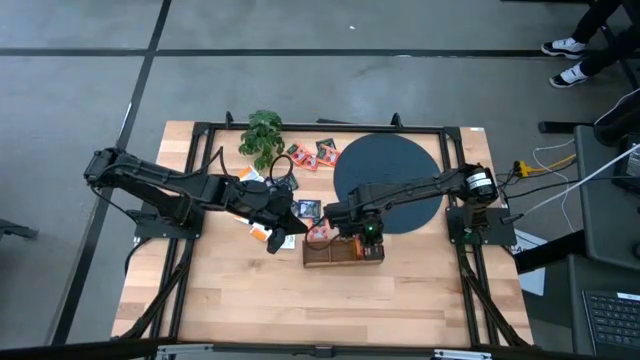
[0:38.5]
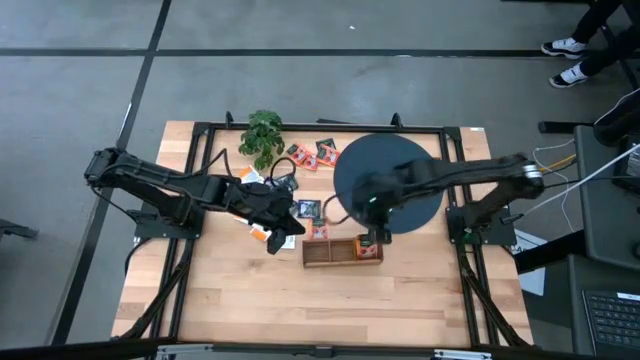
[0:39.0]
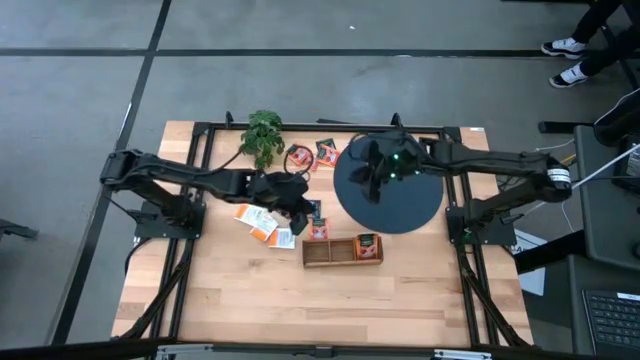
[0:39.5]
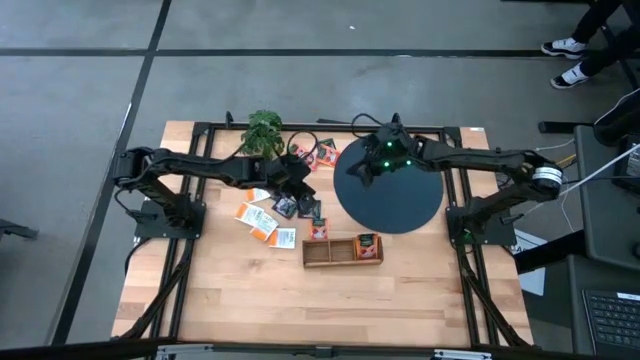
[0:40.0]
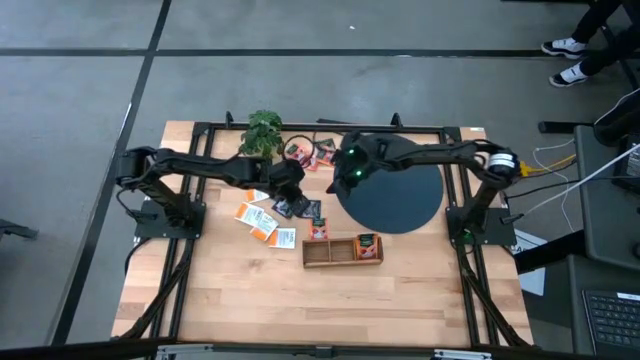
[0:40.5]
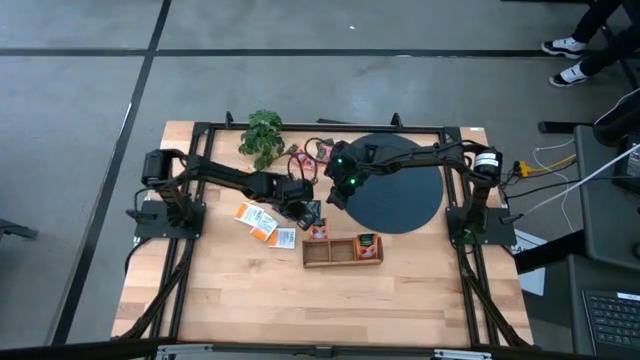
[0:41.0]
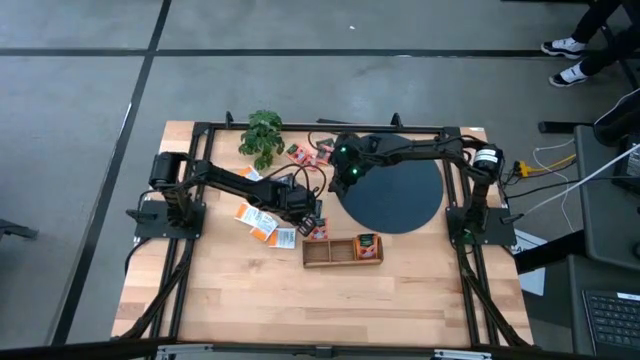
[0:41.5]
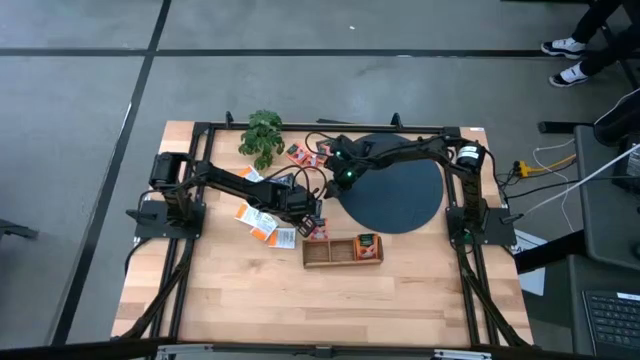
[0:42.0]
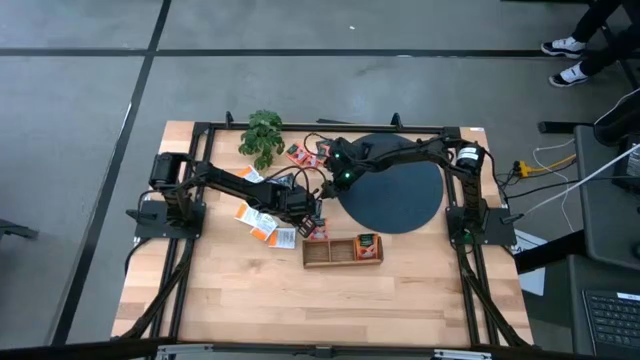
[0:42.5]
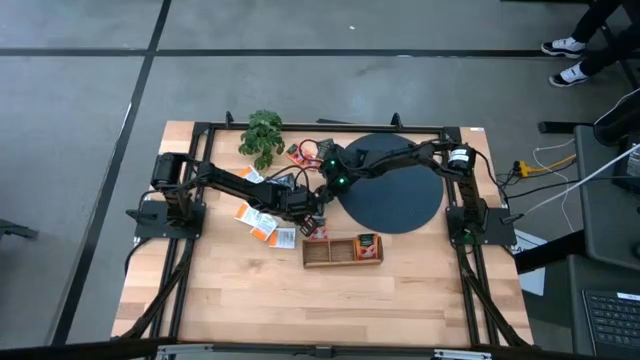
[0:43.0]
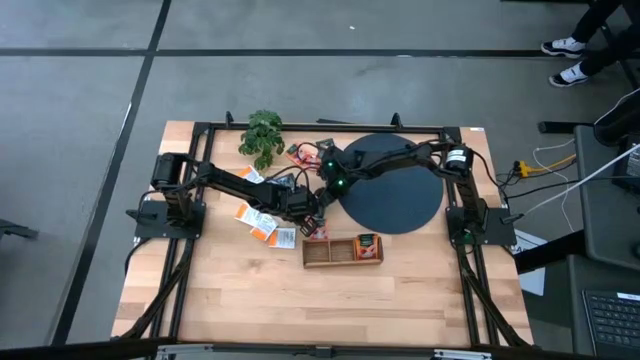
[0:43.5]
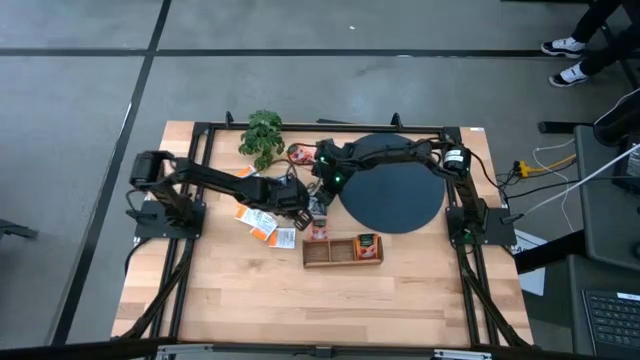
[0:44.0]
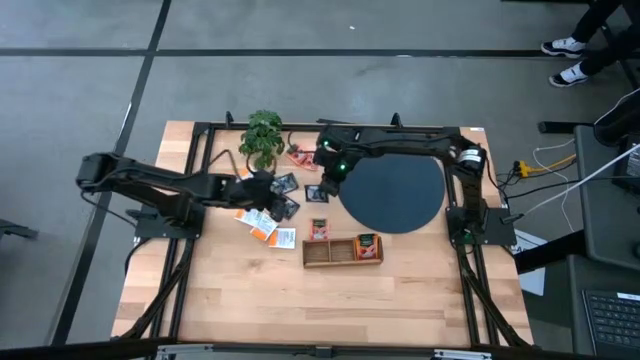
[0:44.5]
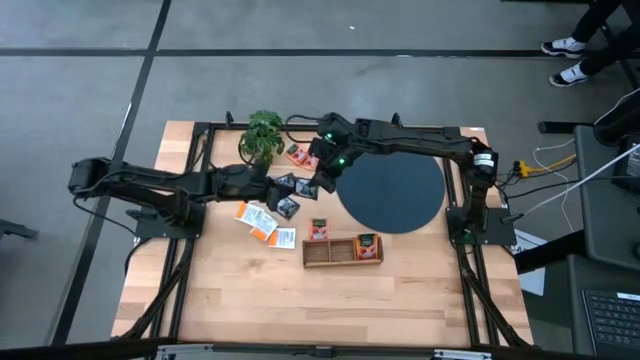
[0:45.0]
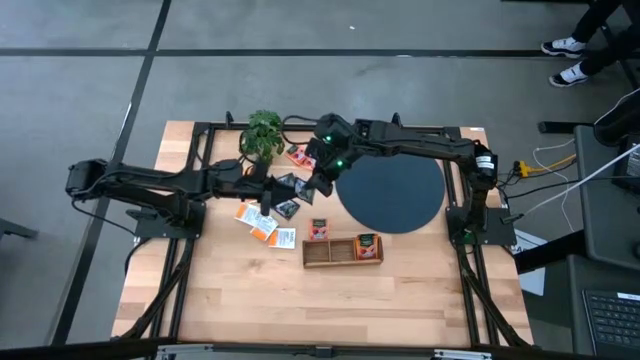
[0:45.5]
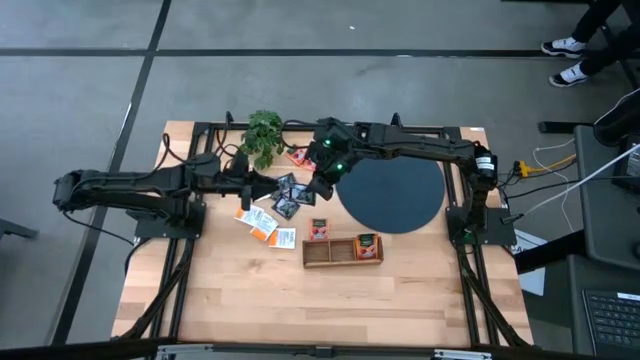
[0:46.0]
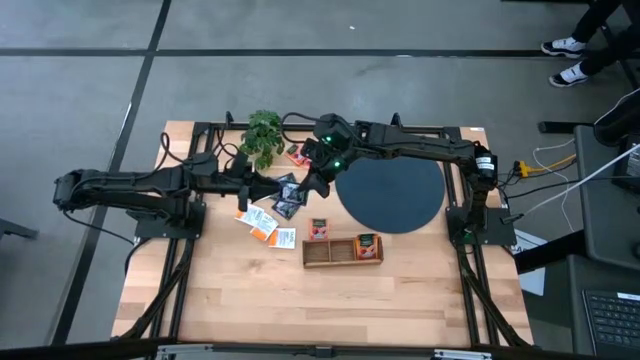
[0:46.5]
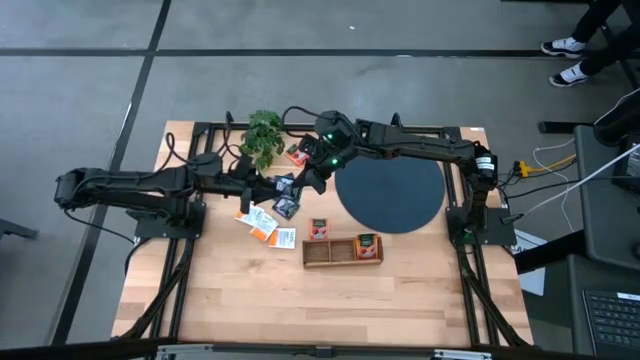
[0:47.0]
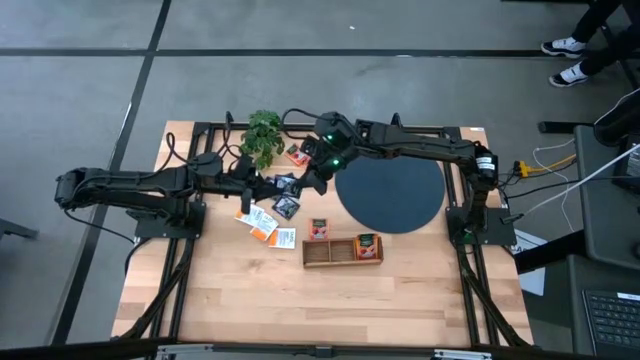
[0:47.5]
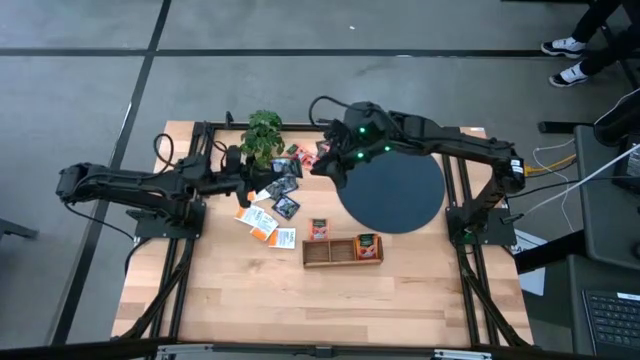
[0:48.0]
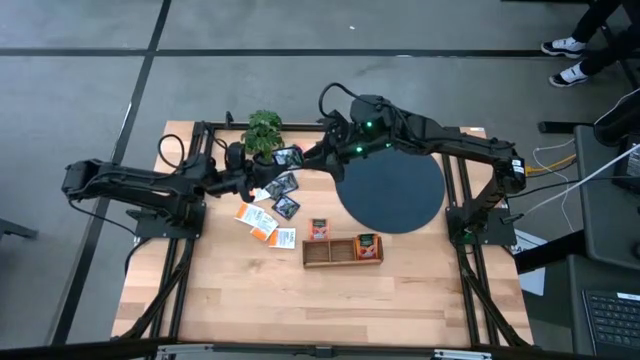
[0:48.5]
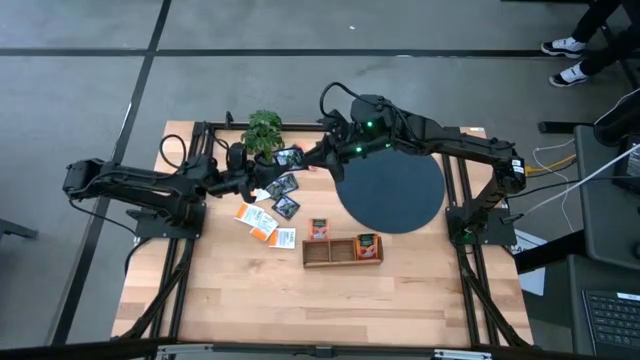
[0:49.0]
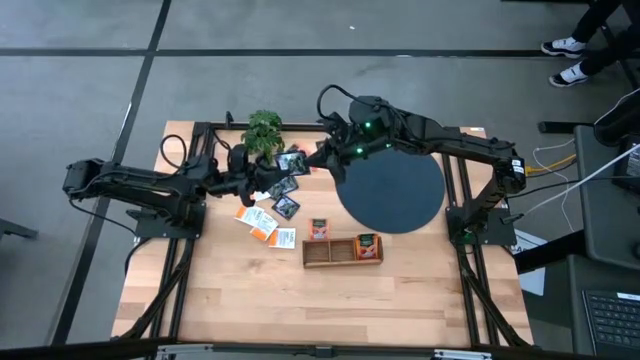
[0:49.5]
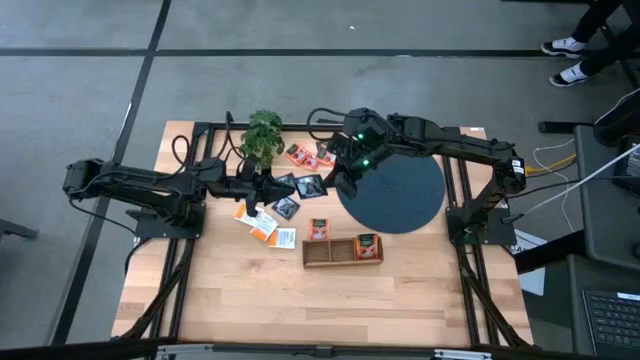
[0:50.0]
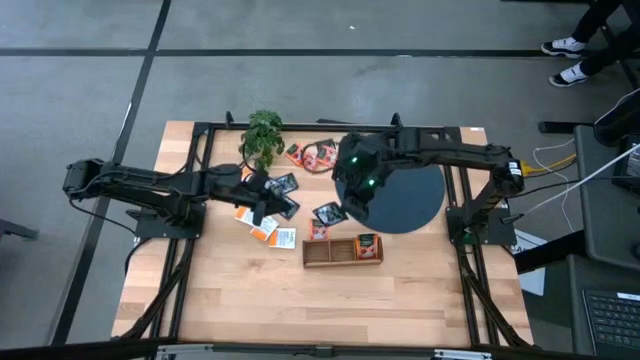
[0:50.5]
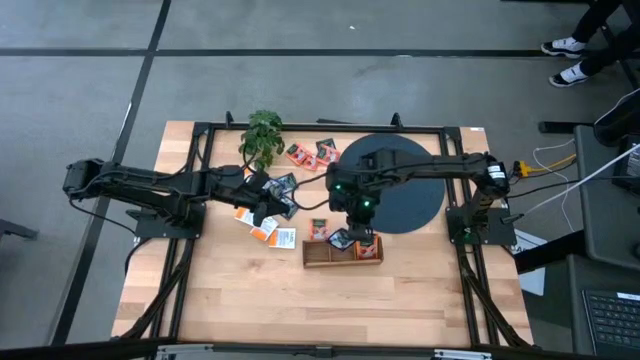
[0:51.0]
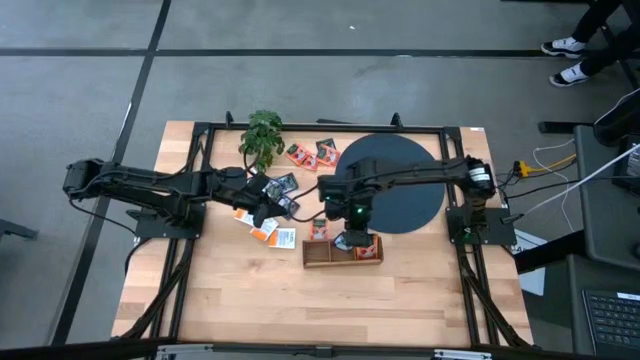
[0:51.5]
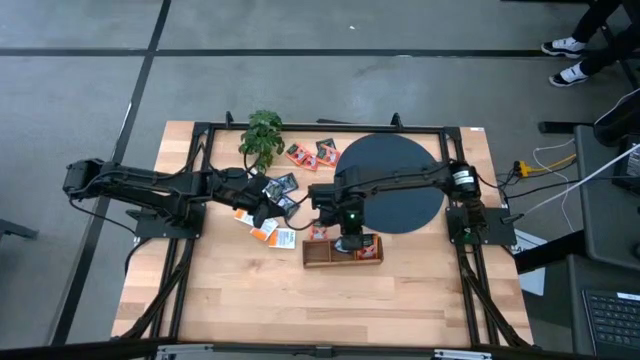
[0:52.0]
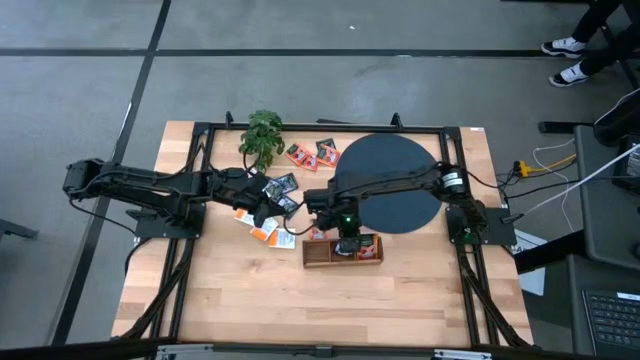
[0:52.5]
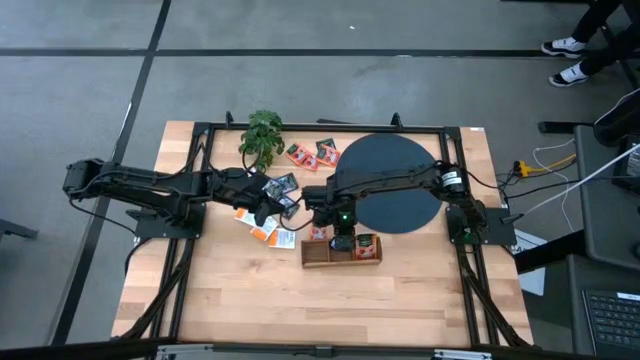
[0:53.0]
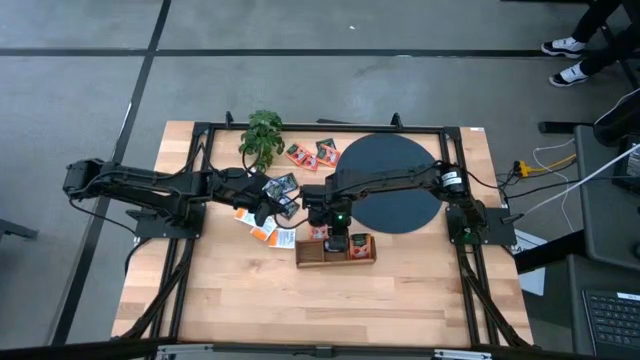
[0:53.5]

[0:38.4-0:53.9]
Task: Pick & Place Tea
Put the purple tea bag into the middle section of the wooden organizer

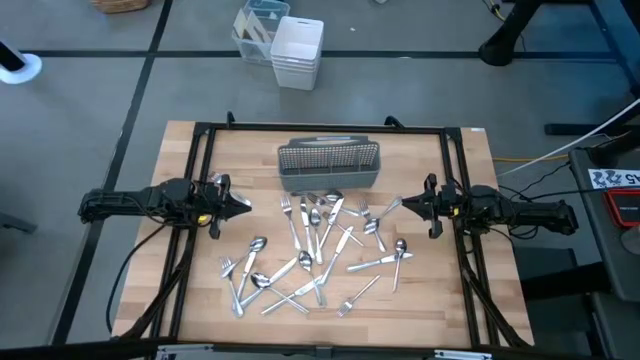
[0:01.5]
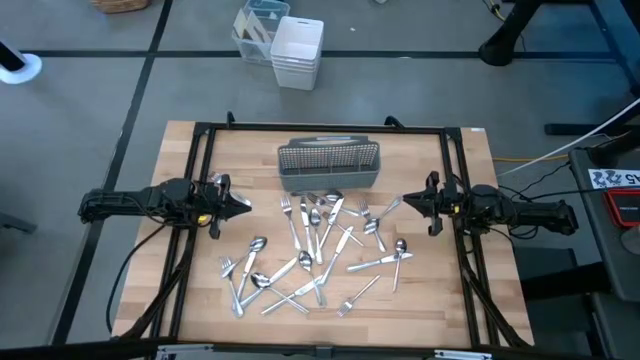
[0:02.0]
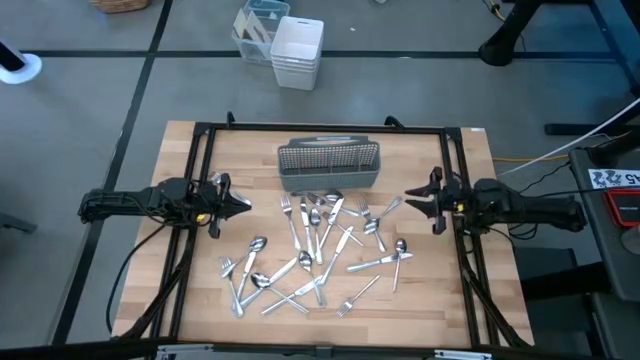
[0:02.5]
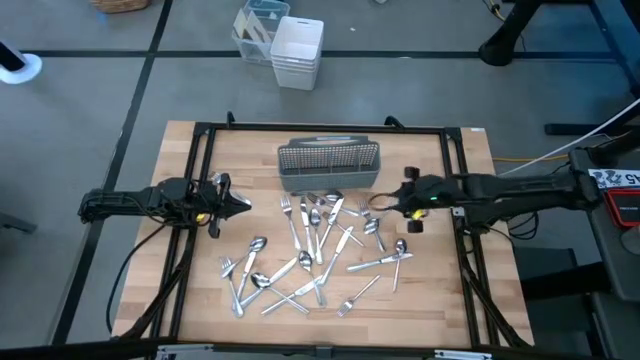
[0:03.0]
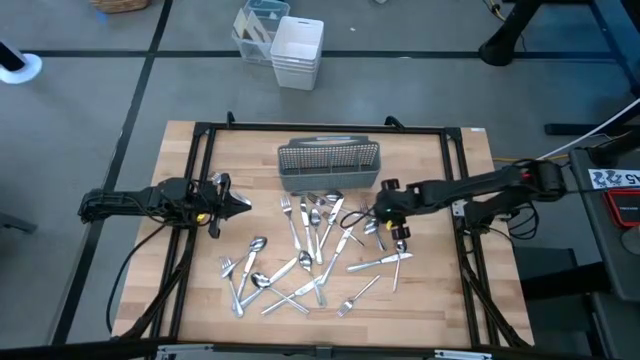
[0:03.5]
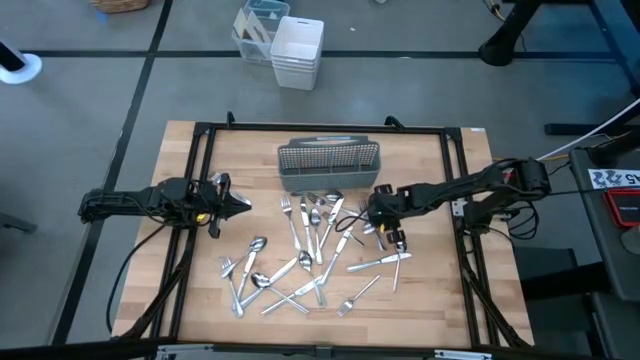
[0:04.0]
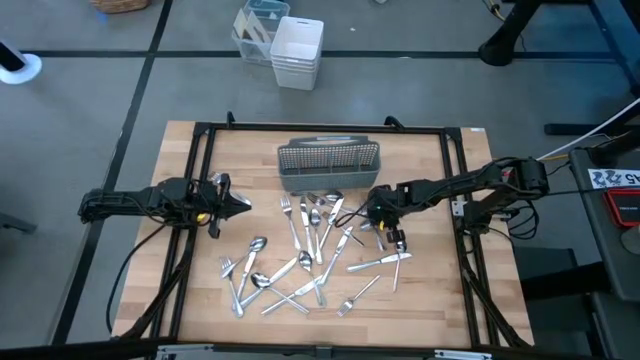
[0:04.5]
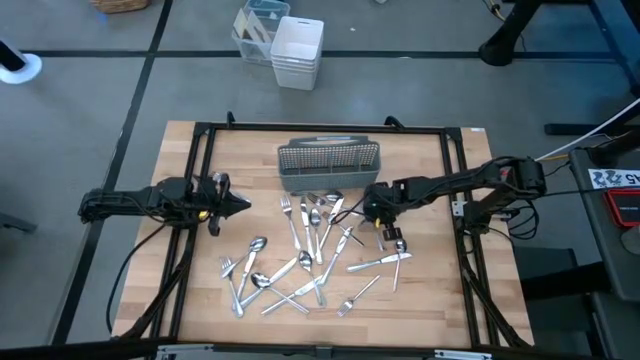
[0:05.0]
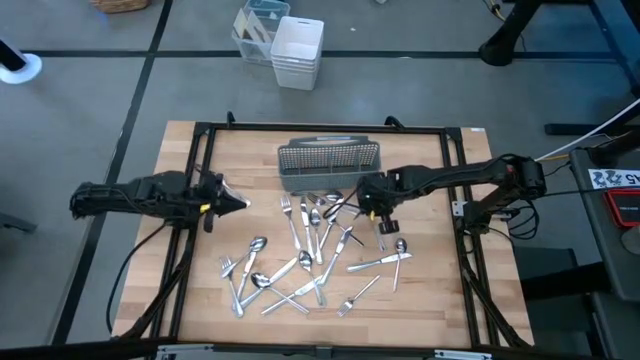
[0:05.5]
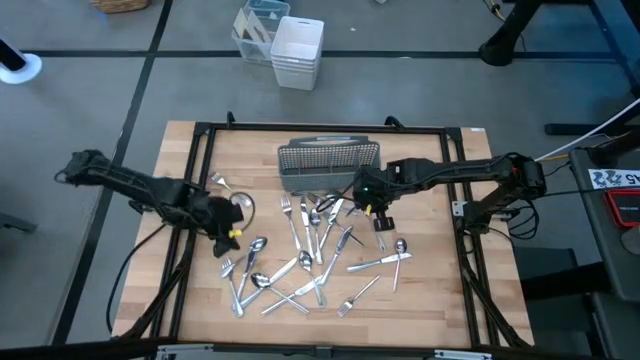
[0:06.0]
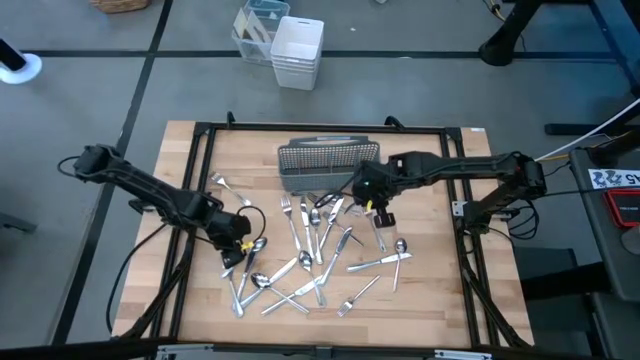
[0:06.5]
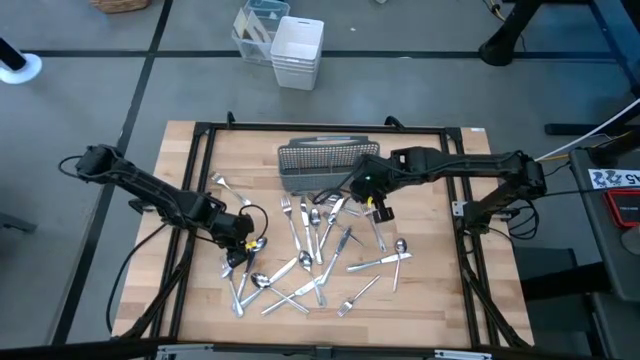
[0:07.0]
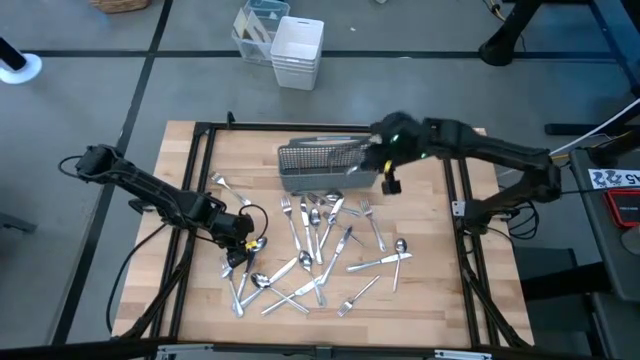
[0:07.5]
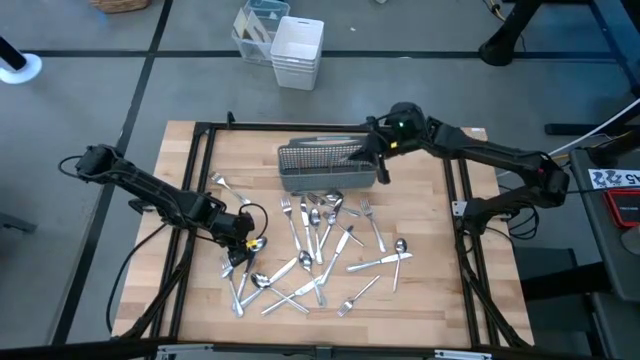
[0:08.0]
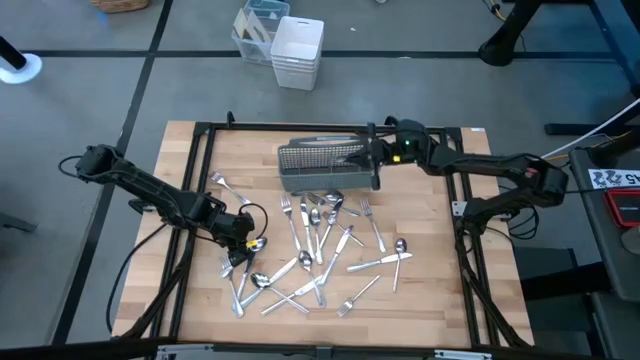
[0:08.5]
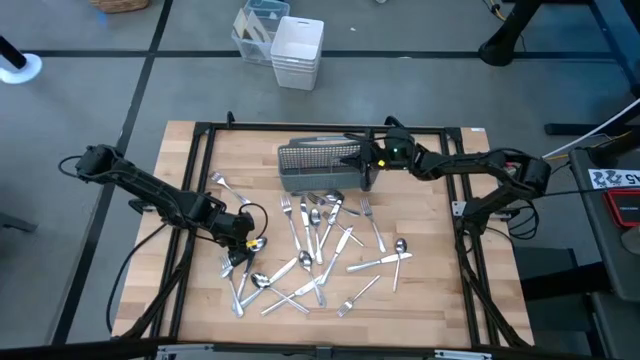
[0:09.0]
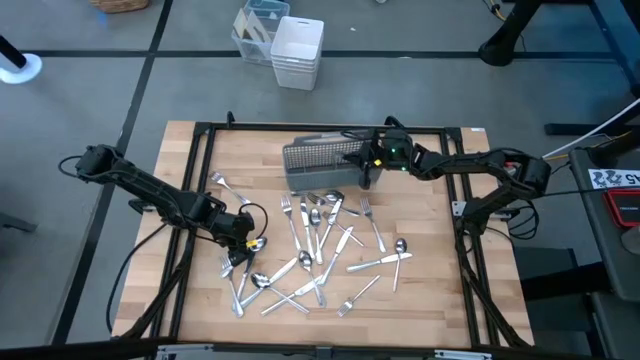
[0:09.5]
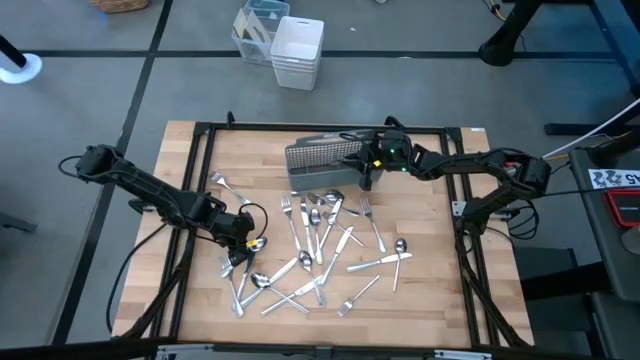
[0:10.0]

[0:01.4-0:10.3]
Task: Sort silverware
Put the spoon into the silverware rack
